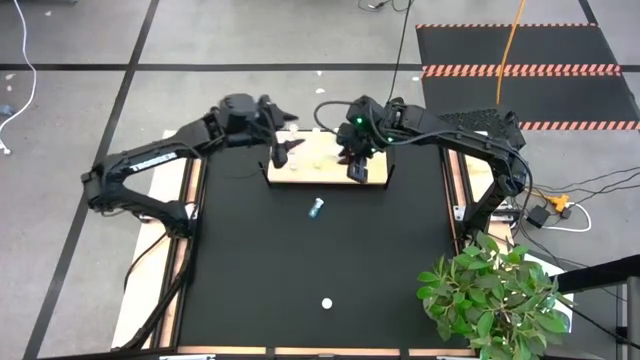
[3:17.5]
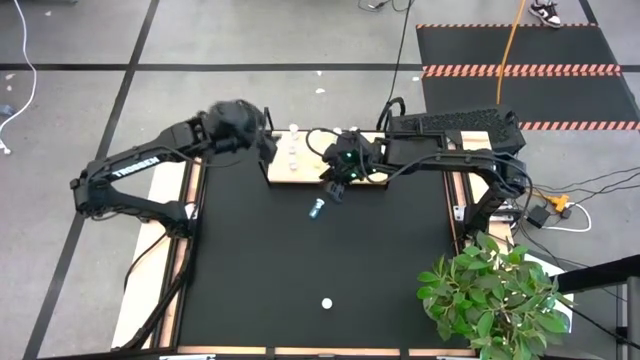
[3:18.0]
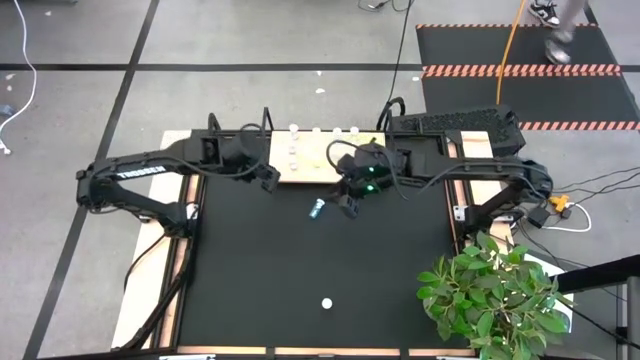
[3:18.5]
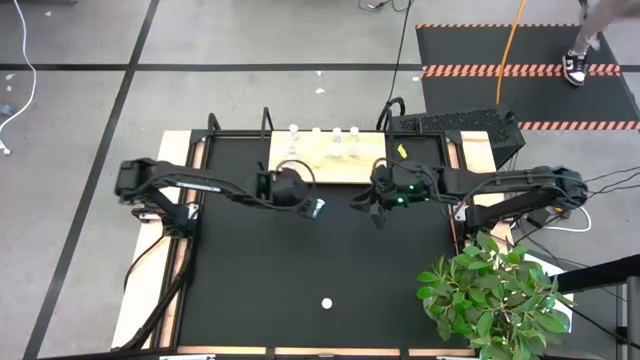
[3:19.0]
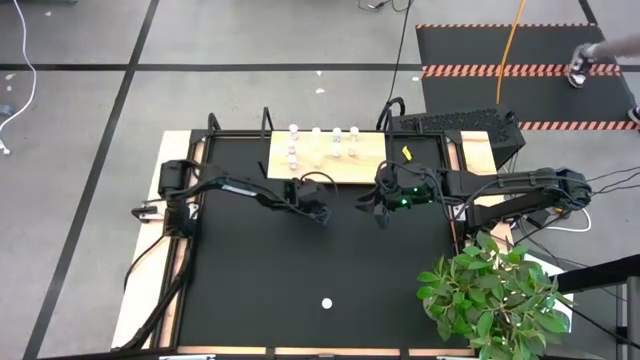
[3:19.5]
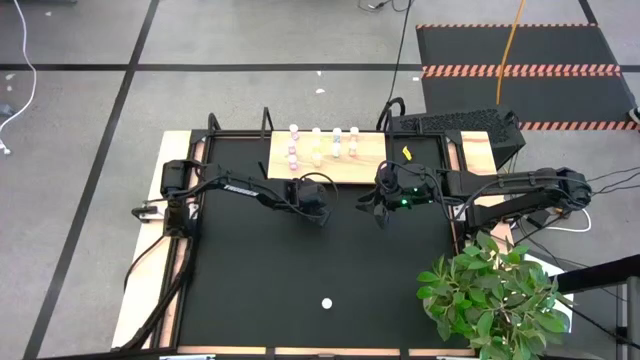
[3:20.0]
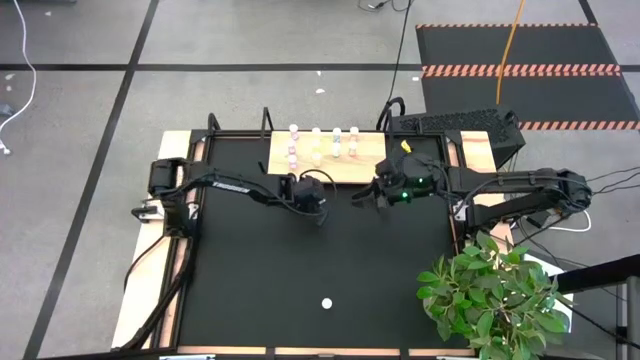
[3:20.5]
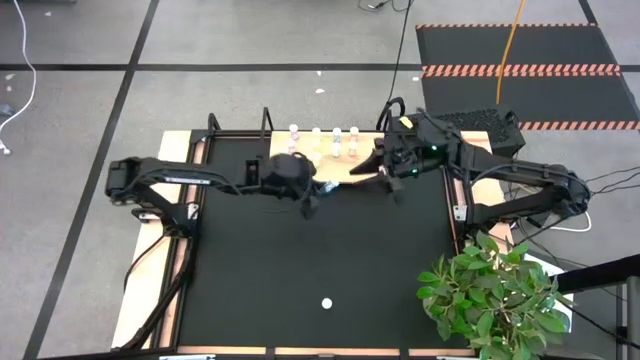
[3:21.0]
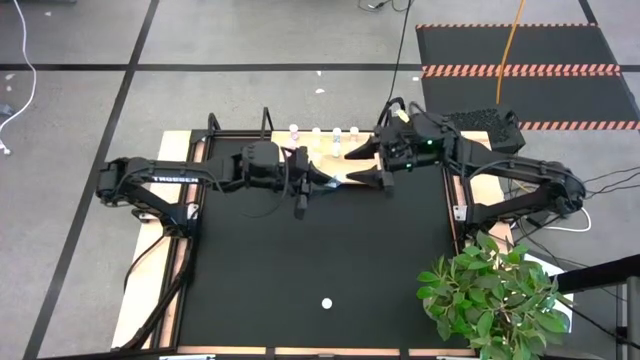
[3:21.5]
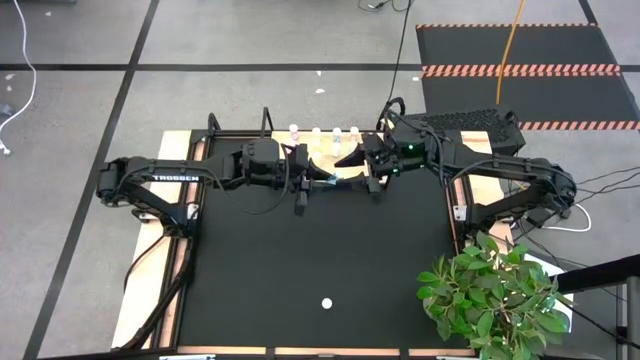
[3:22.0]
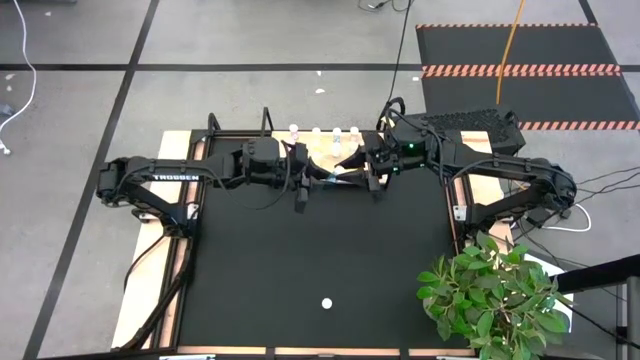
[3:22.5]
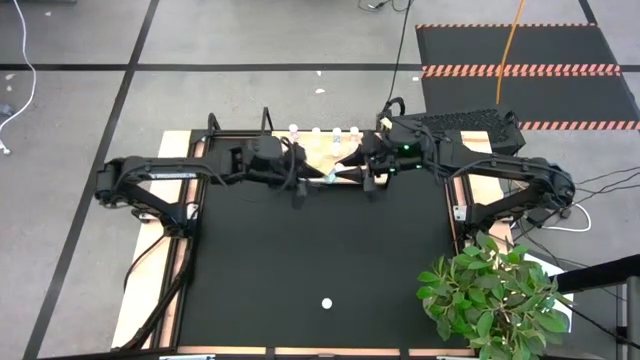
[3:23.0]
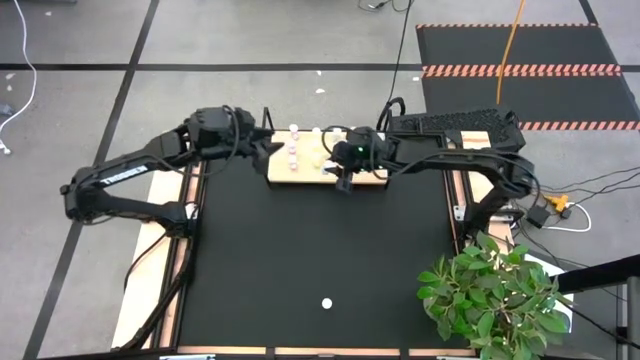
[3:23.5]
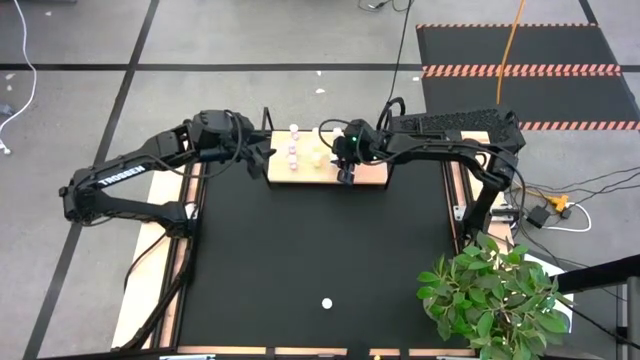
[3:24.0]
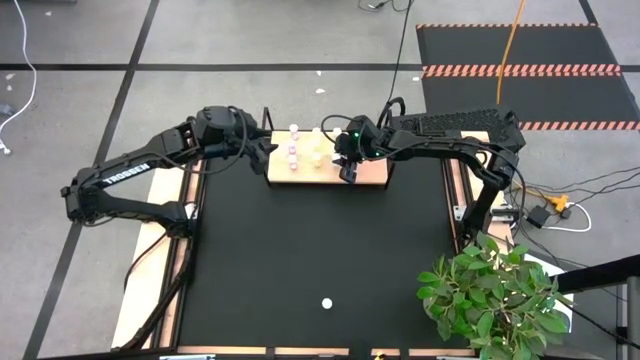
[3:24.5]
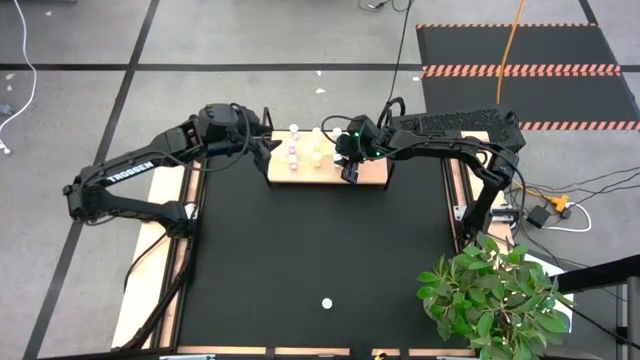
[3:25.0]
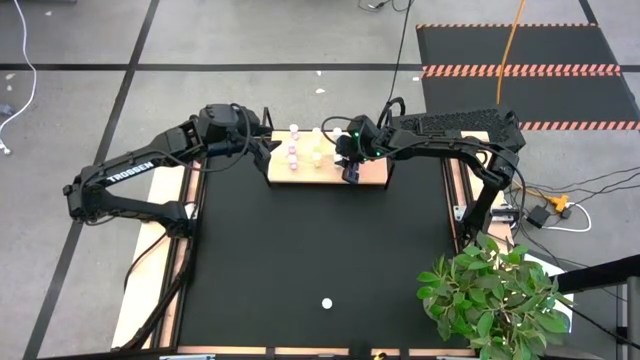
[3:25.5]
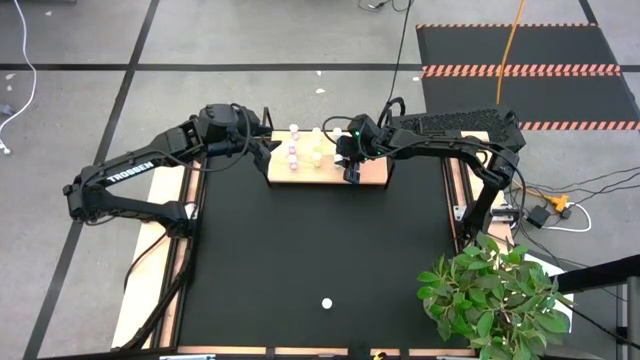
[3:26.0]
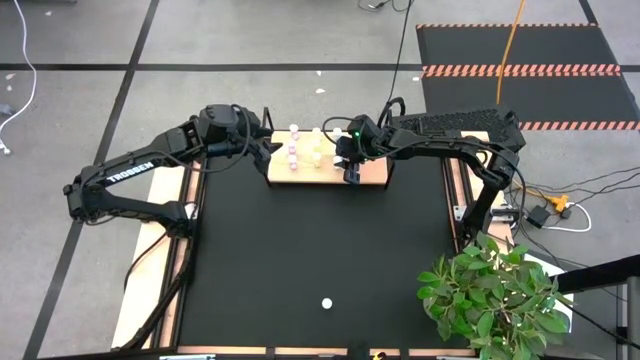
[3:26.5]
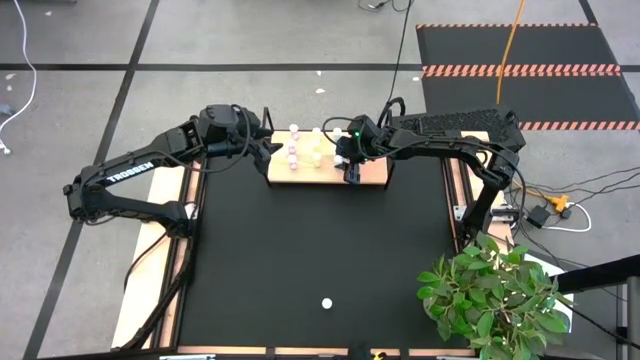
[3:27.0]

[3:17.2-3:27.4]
Task: Pick and place medicine bottles onto shelf by color
Put the blue pill bottle on the shelf aligned with the other blue pill bottles

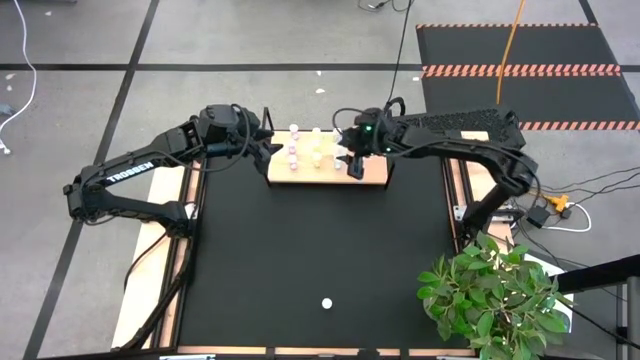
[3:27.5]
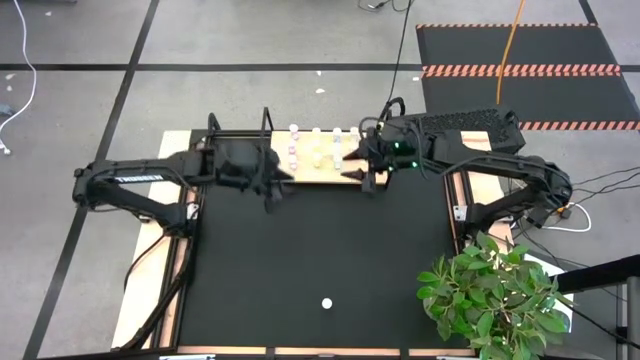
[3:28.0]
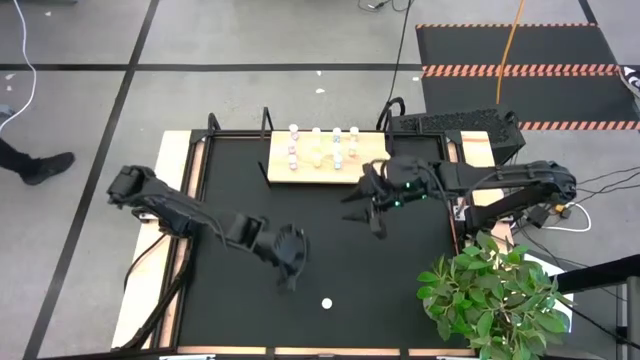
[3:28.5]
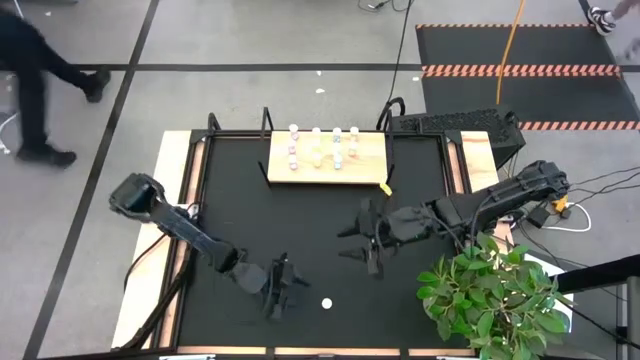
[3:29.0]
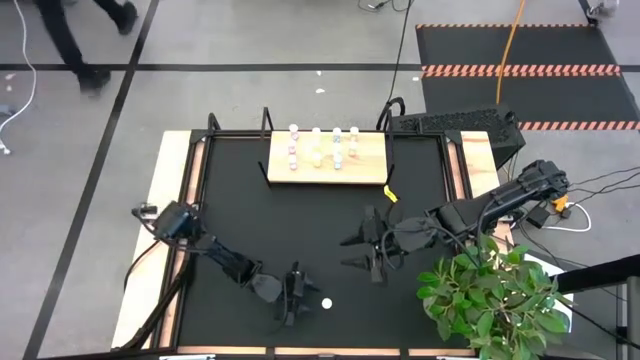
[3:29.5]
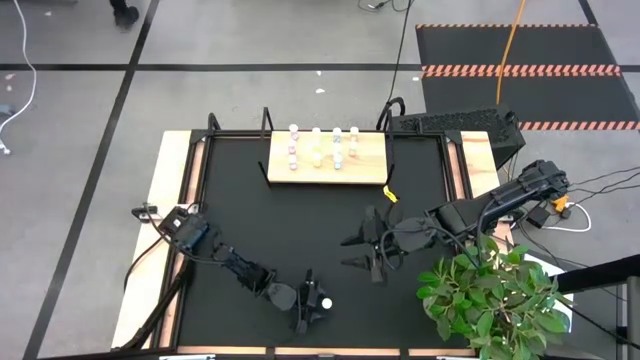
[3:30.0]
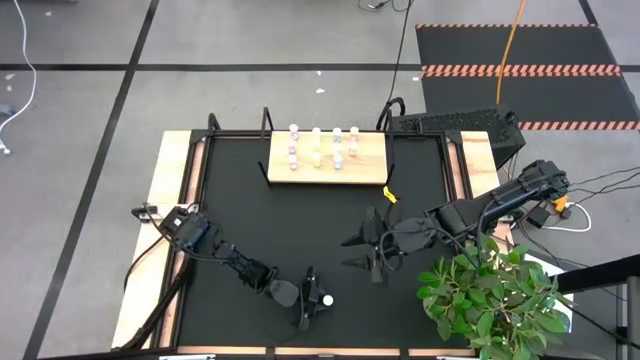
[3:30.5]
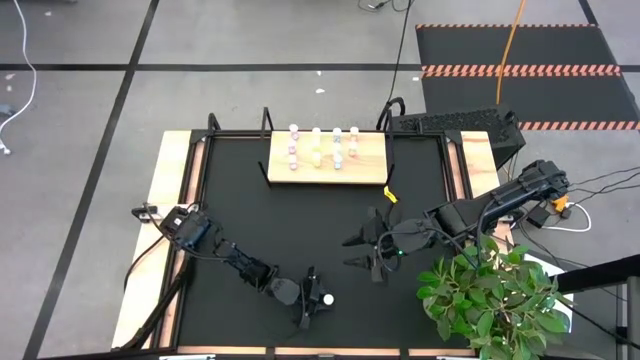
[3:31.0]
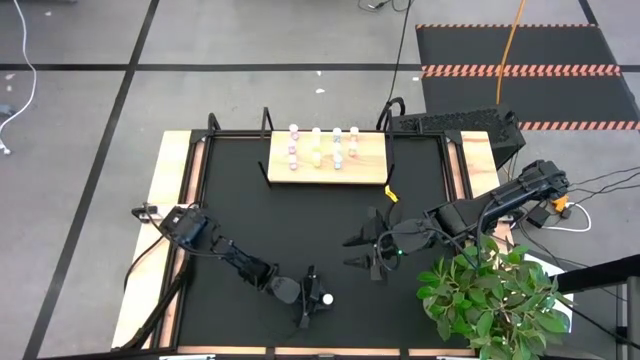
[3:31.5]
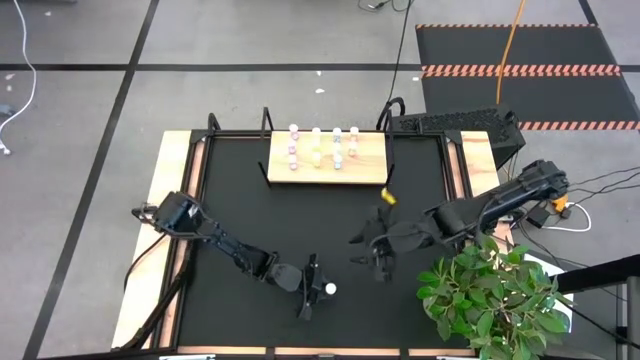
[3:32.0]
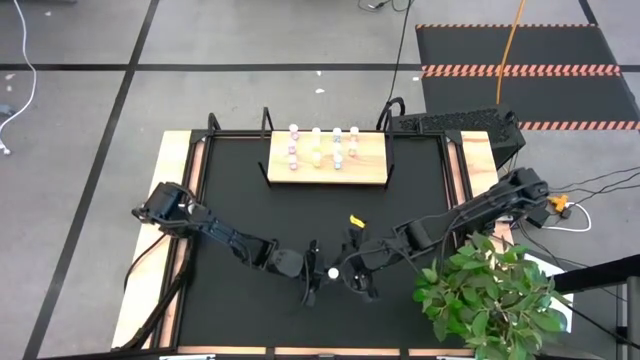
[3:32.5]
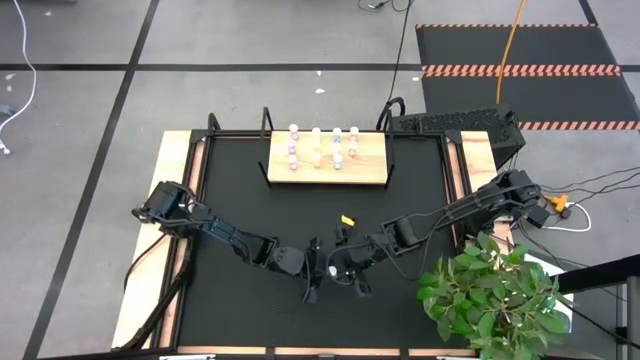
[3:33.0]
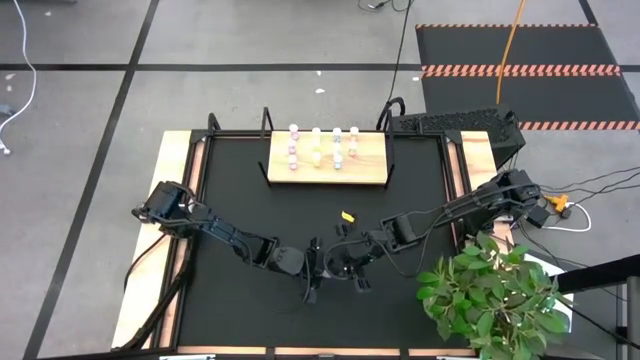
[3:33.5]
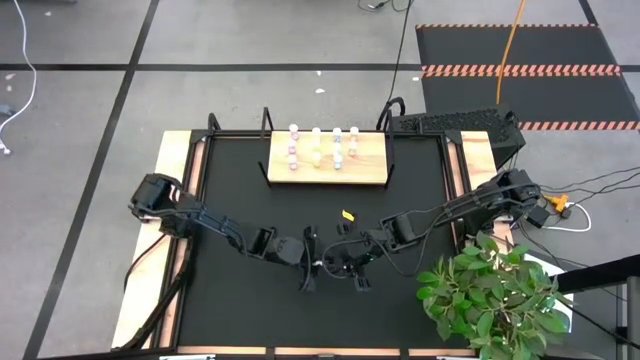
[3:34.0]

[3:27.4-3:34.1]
Put the orange pill bottle on the shelf aligned with the other orange pill bottles

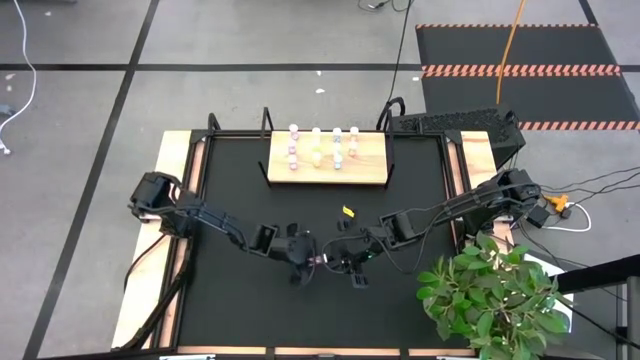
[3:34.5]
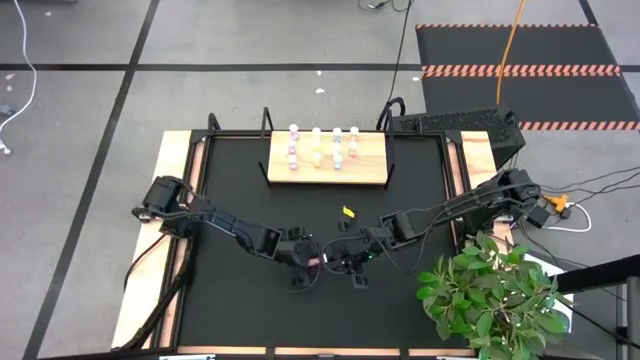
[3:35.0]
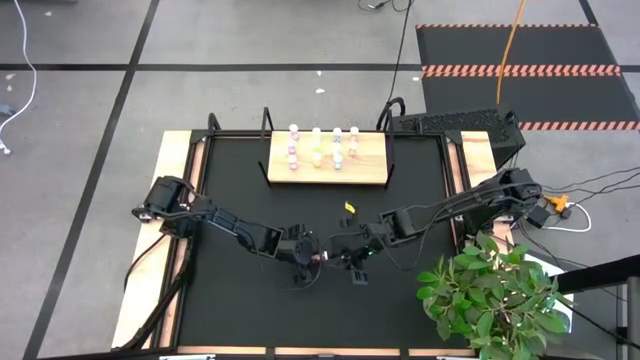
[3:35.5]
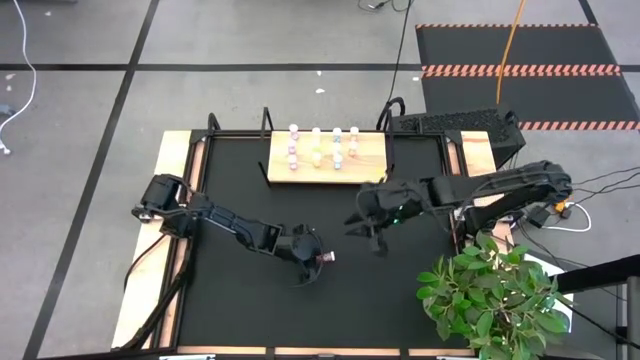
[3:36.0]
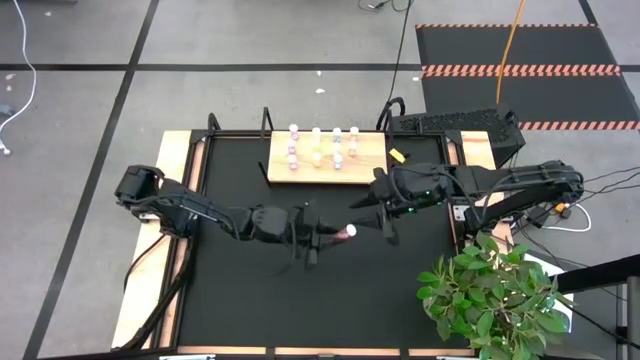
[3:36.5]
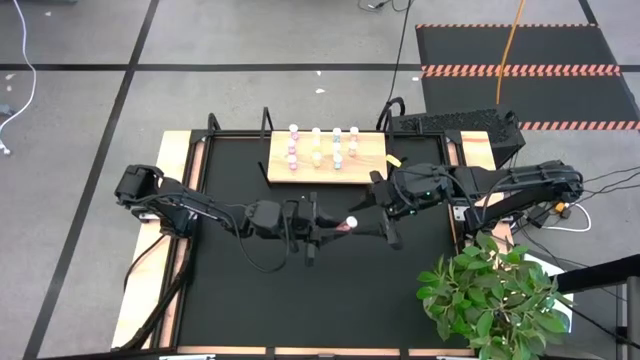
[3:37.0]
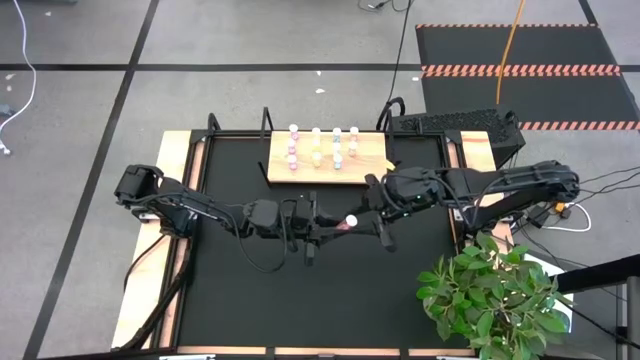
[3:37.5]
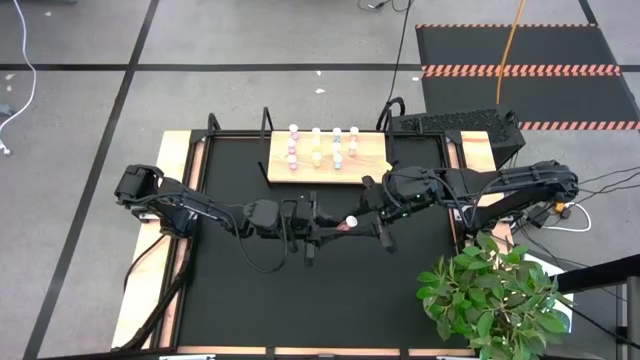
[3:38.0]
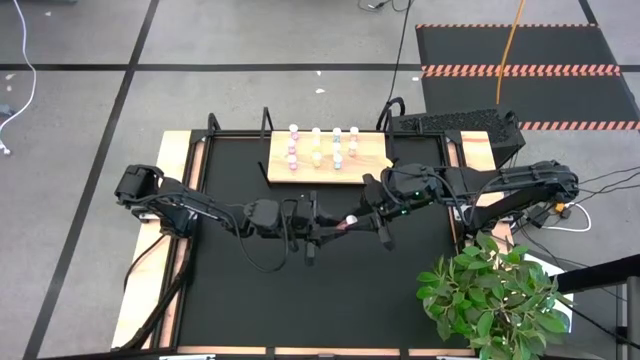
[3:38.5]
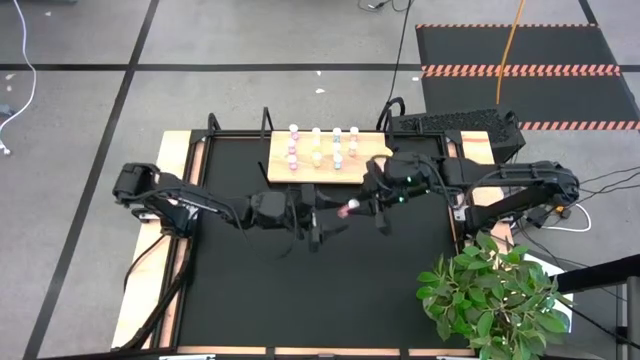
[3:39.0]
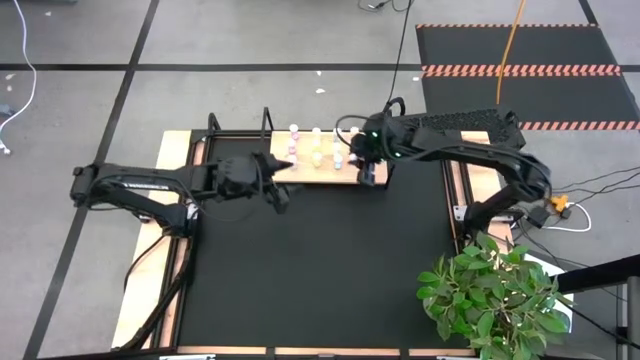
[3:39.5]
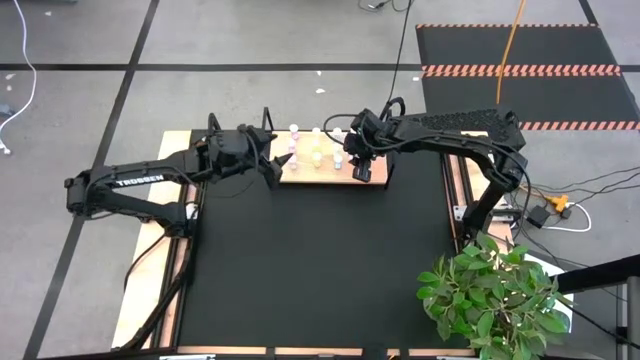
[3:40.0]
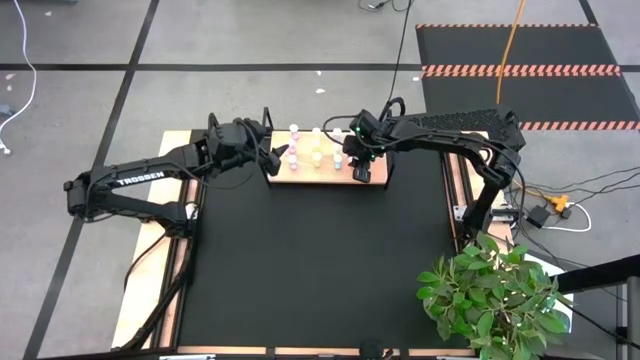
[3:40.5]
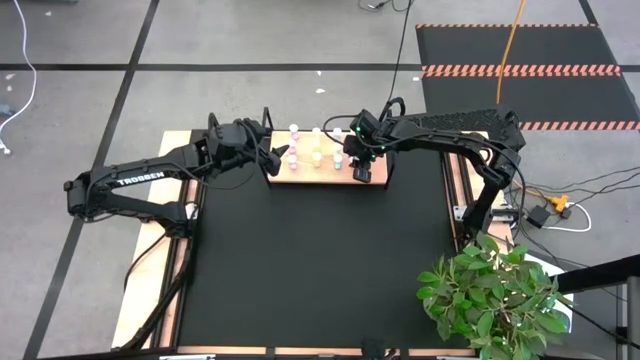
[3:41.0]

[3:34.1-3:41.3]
Put the orange pill bottle on the shelf aligned with the other orange pill bottles
